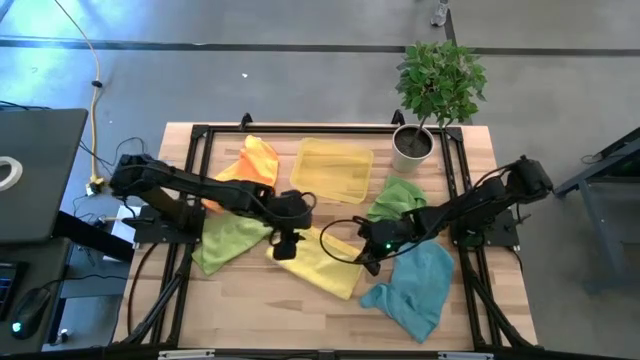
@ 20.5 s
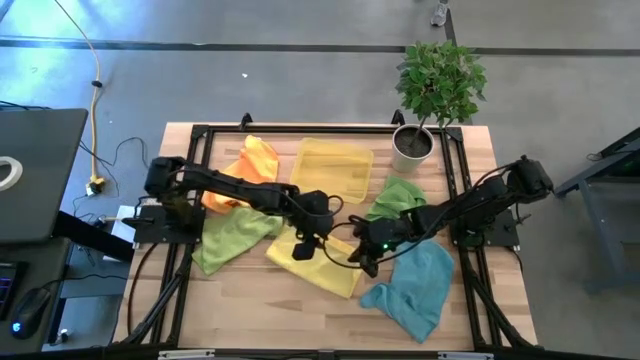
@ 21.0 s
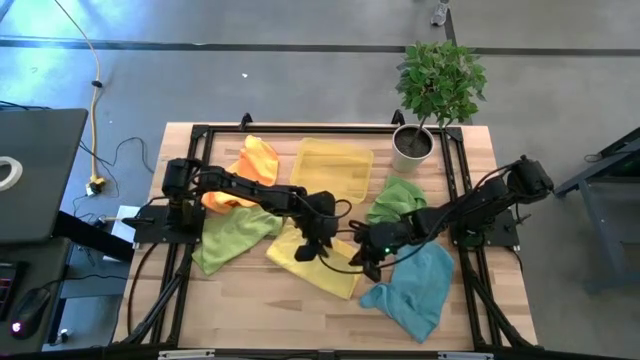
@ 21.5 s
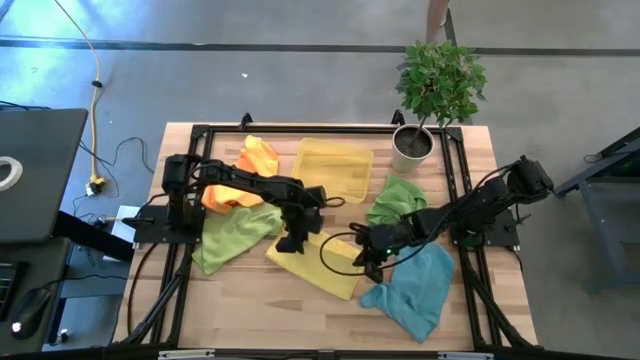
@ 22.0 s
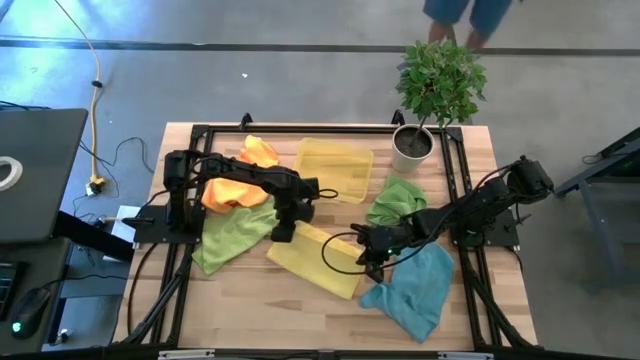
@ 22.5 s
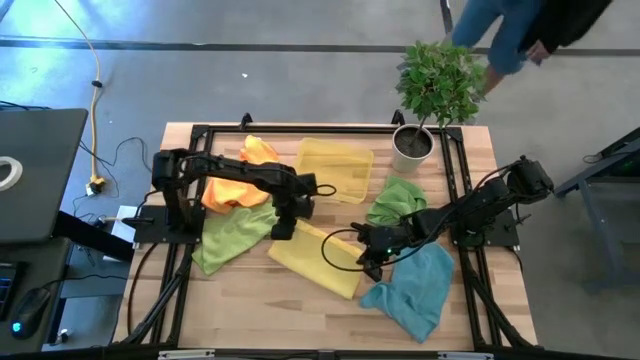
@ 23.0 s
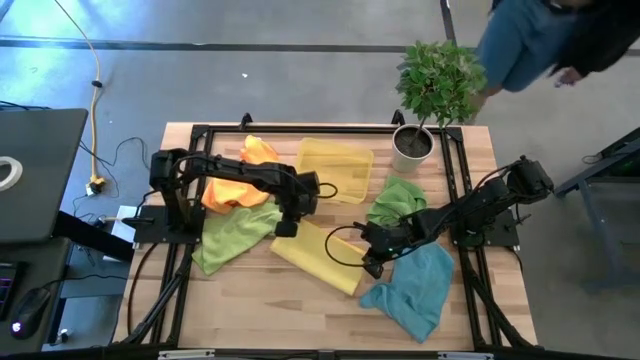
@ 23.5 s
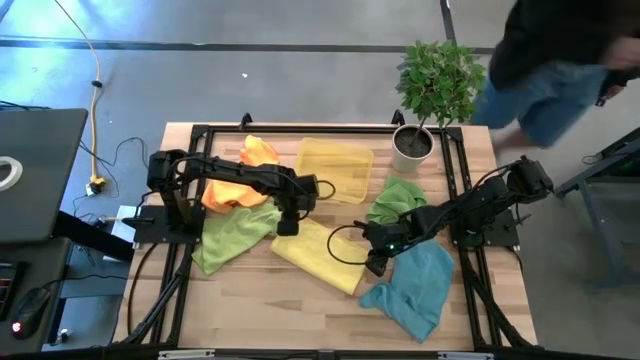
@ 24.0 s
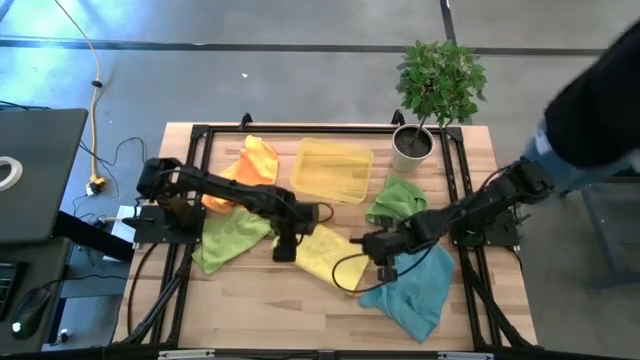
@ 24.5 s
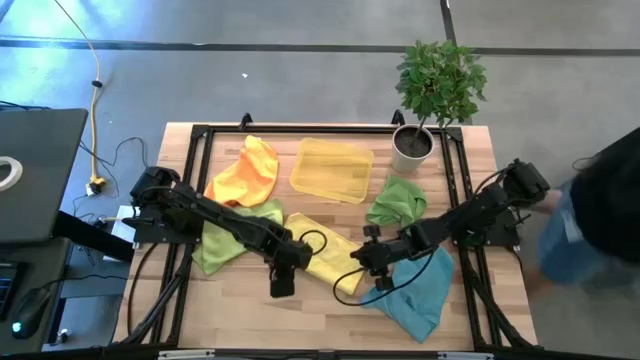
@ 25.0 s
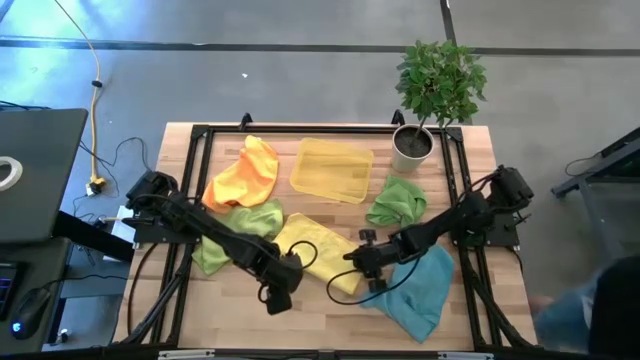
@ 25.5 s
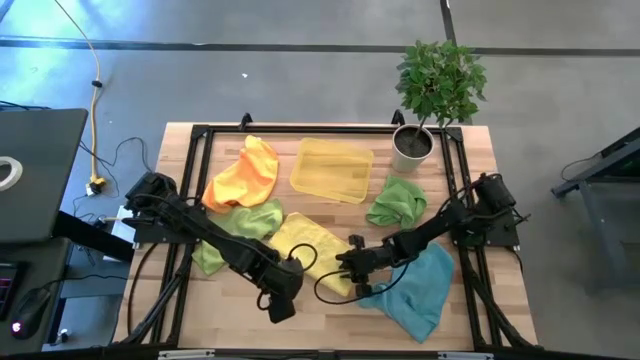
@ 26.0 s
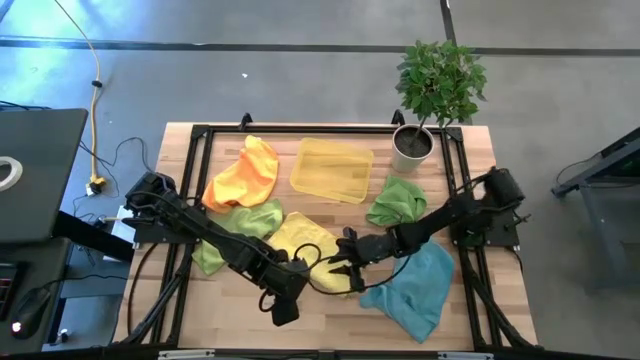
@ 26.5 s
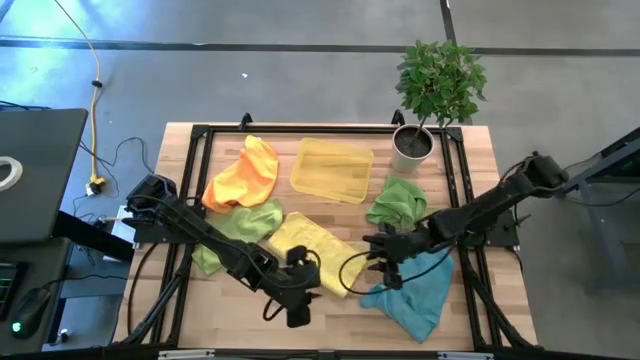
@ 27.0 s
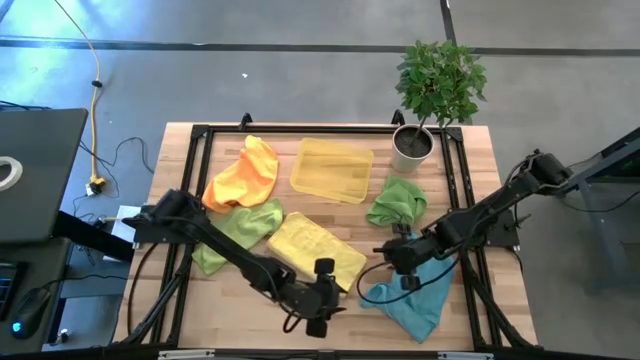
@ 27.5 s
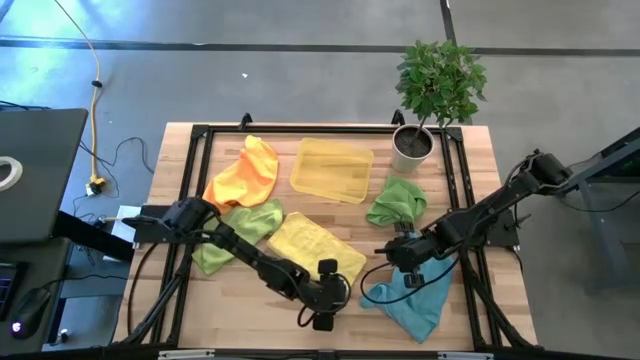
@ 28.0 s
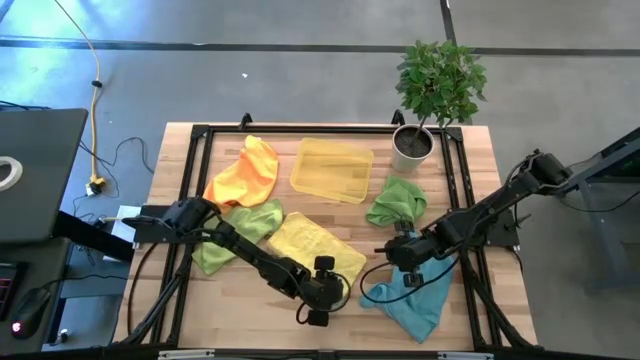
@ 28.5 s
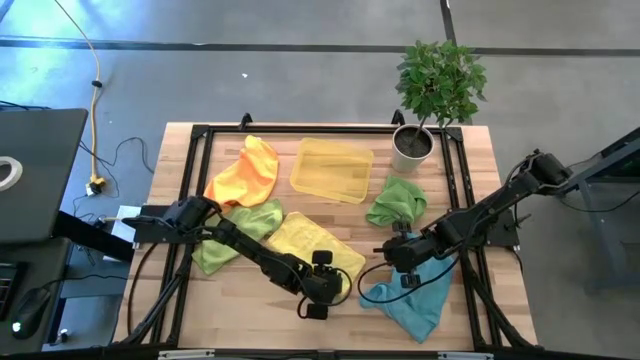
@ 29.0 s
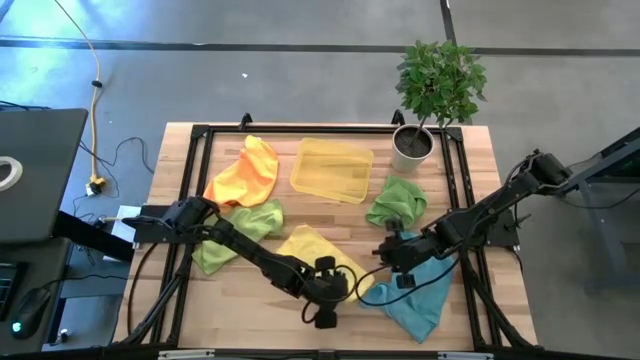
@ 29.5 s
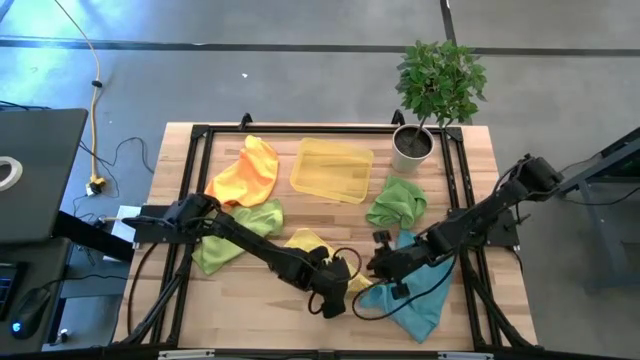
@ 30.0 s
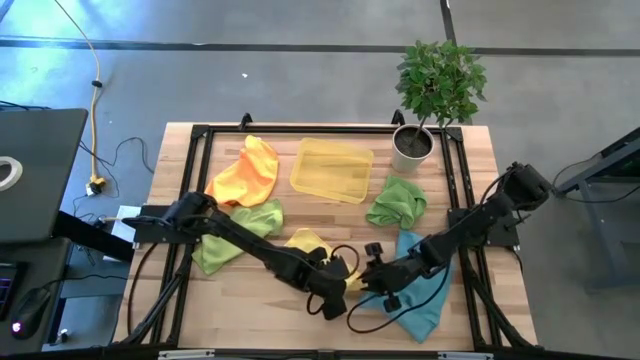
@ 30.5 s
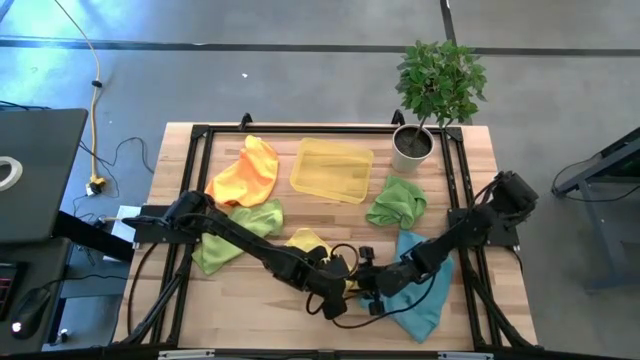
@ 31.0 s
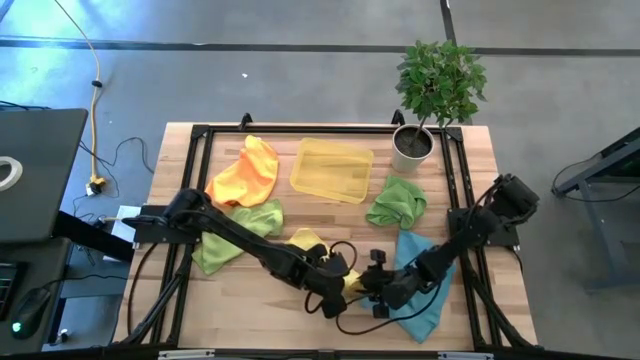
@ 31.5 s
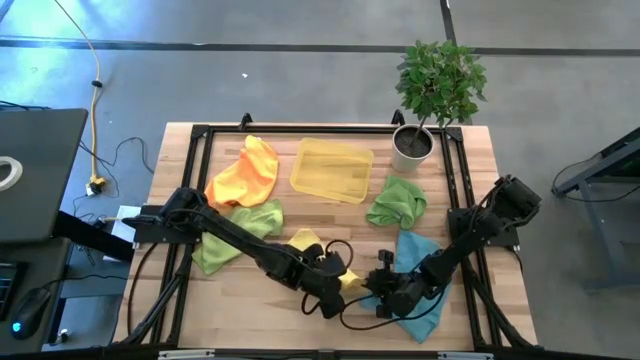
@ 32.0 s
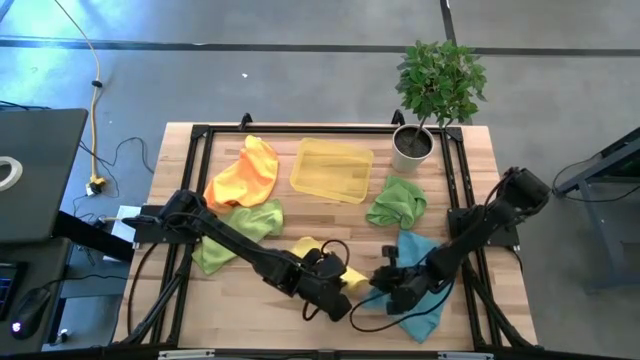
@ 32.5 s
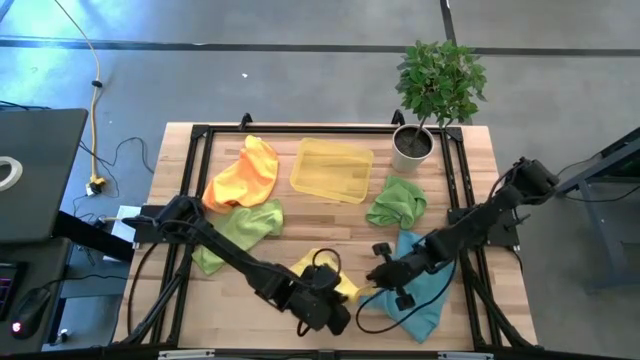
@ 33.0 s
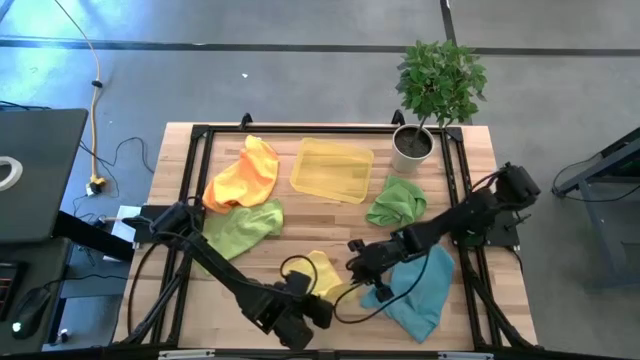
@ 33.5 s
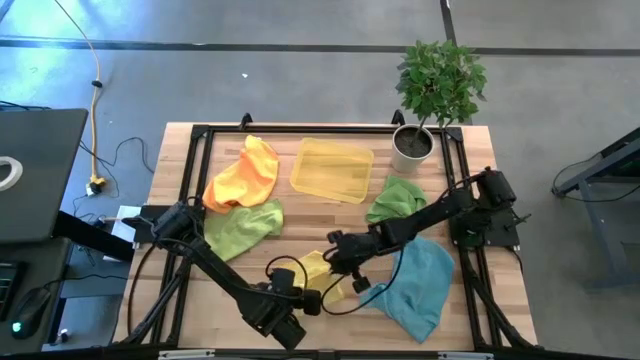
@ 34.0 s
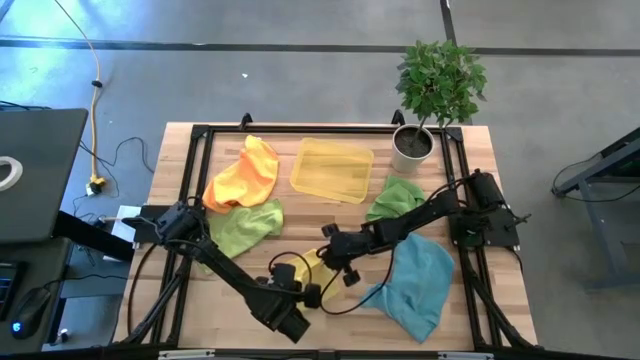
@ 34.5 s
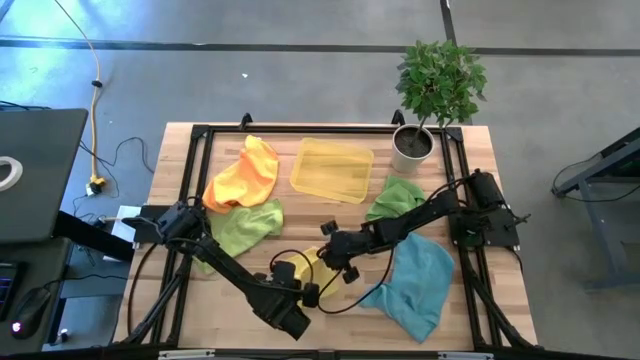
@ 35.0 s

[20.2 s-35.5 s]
Task: Fold microfiber towels
Fold the yellow microfiber towel

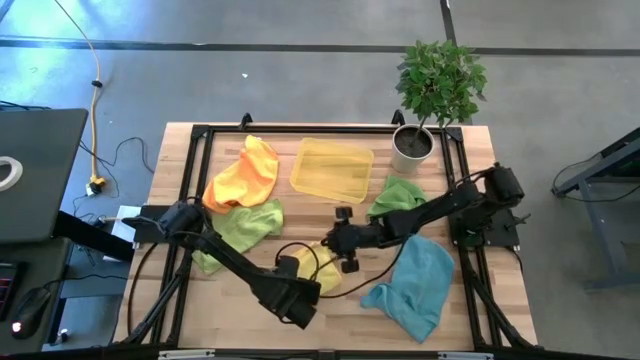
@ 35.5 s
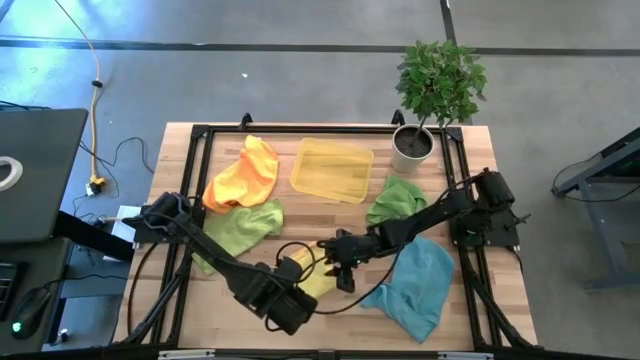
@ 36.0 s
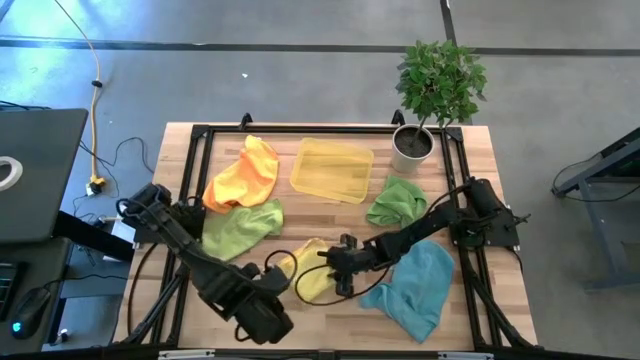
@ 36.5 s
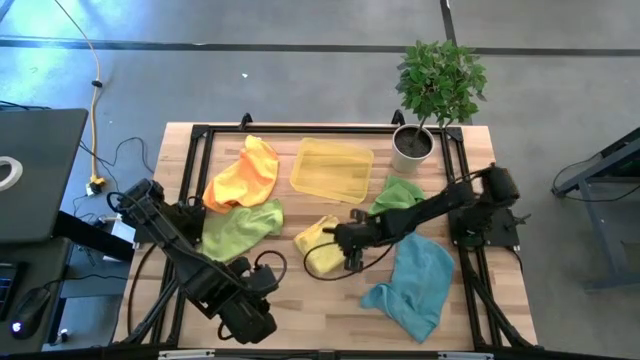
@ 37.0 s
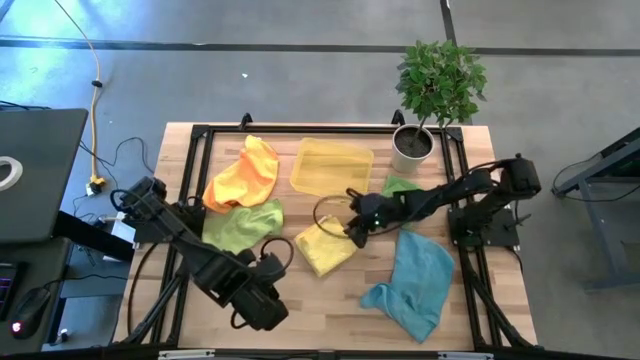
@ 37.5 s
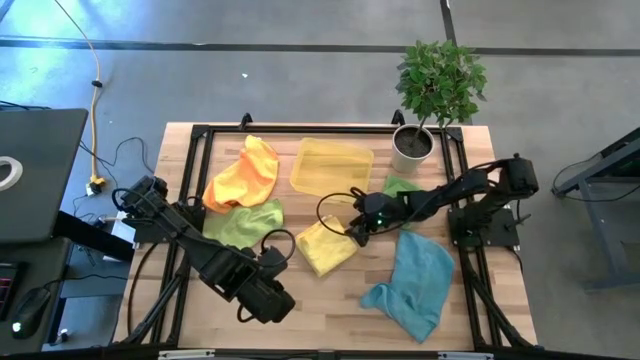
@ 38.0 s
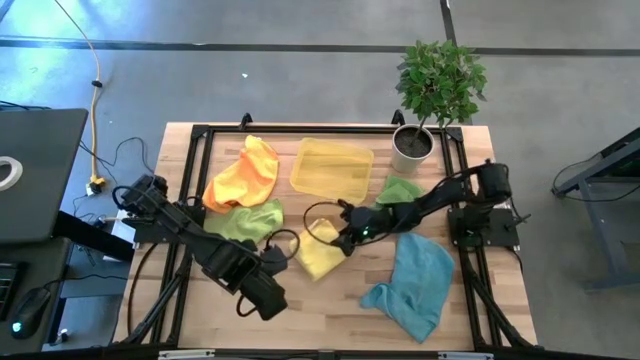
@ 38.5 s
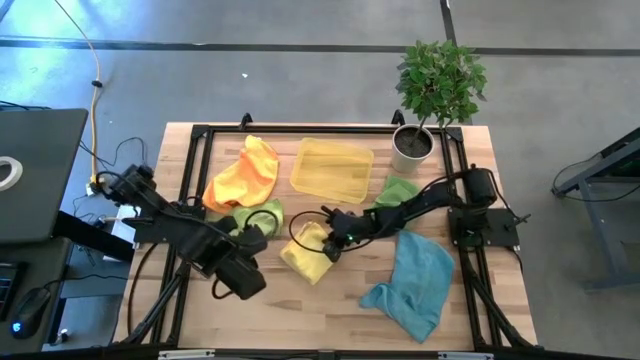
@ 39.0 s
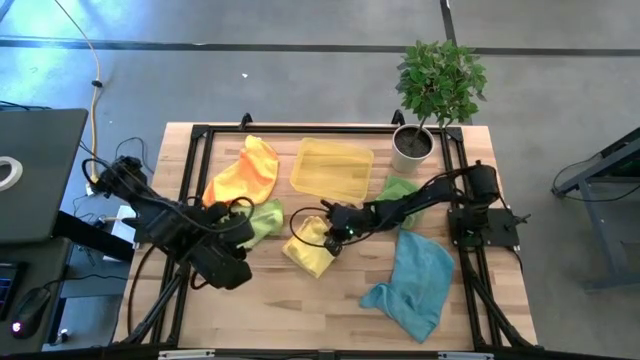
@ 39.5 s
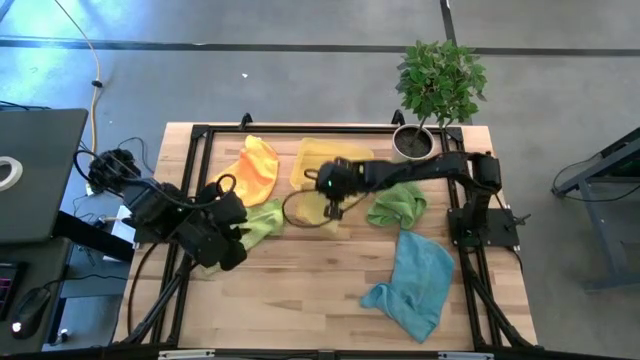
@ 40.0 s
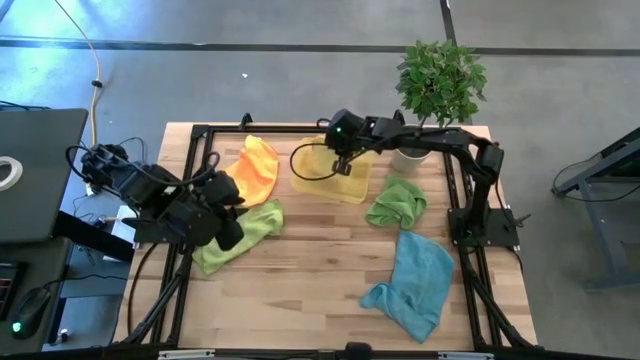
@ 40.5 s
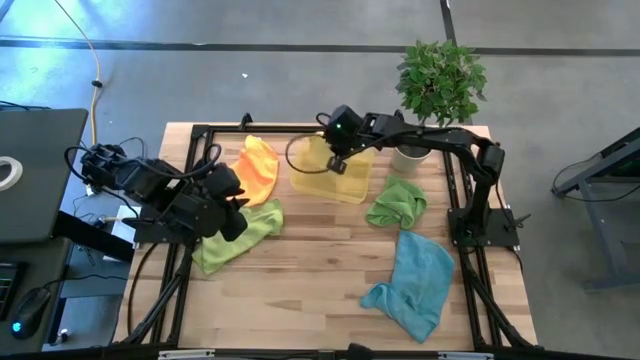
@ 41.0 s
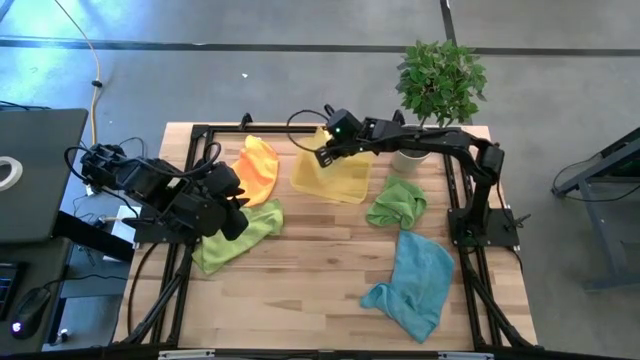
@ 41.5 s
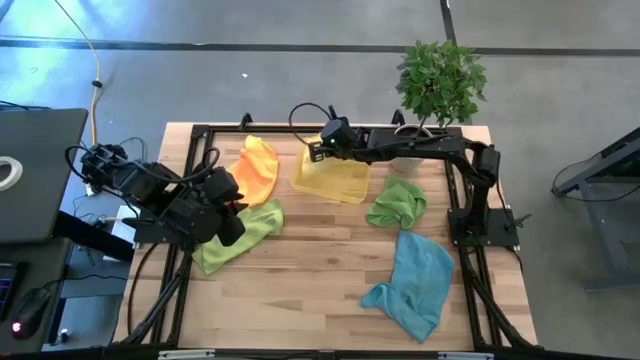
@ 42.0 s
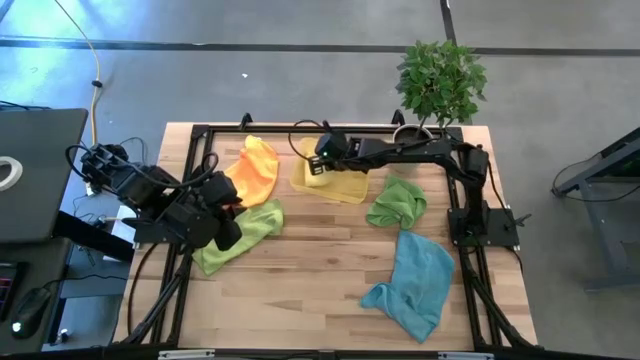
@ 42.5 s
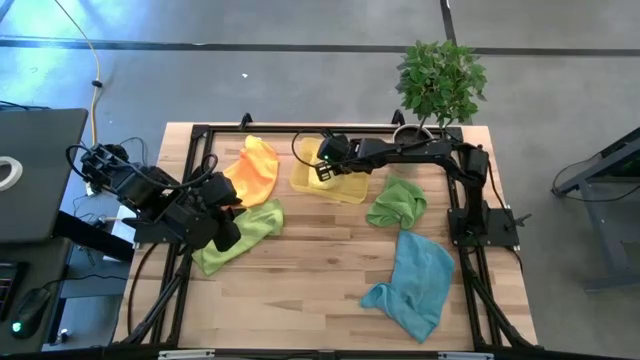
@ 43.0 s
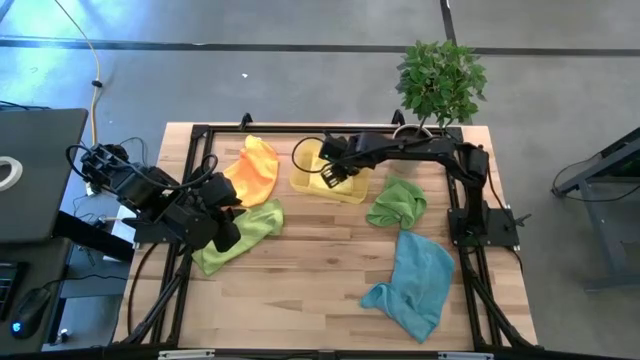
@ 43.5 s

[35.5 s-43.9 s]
Put the folded yellow microfiber towel into the yellow bin
